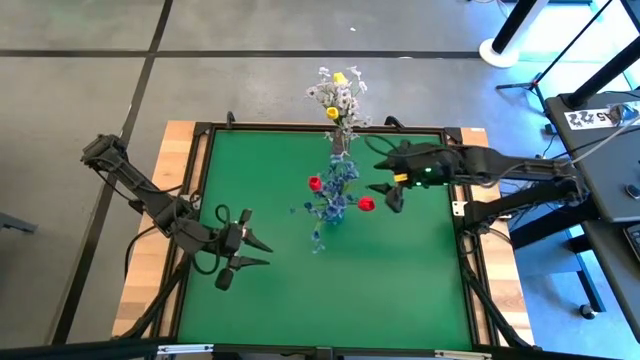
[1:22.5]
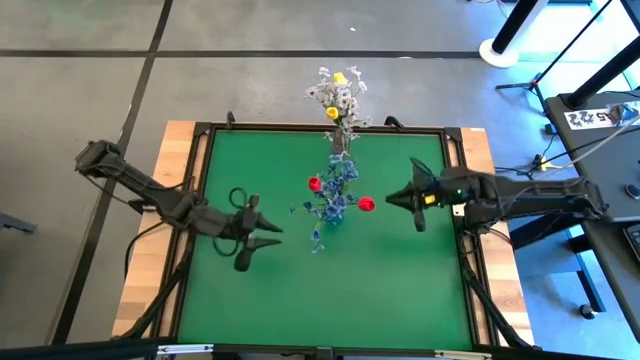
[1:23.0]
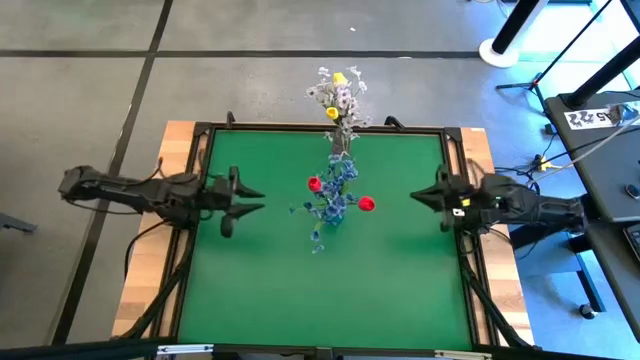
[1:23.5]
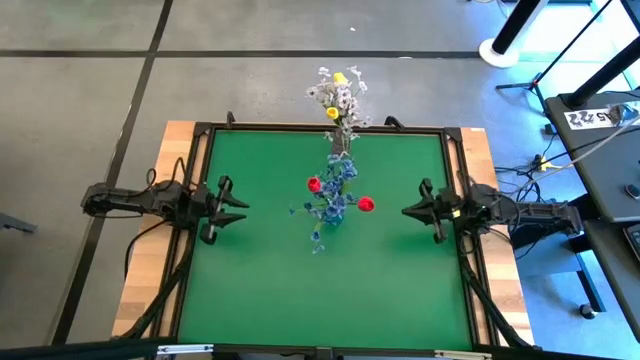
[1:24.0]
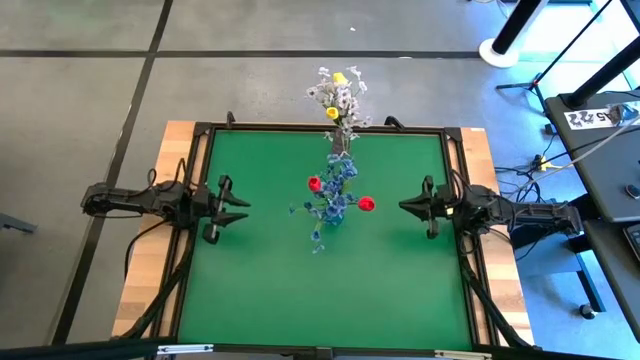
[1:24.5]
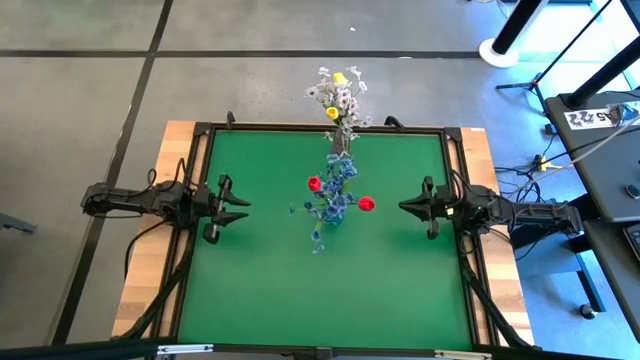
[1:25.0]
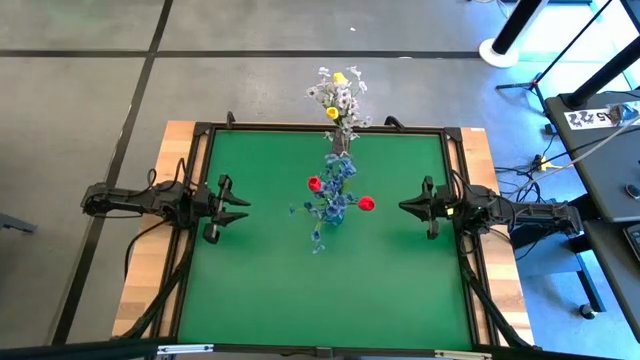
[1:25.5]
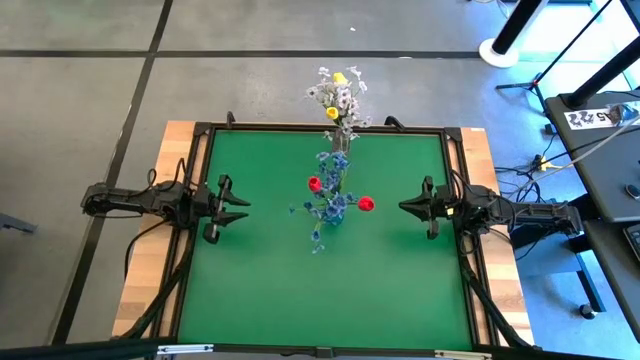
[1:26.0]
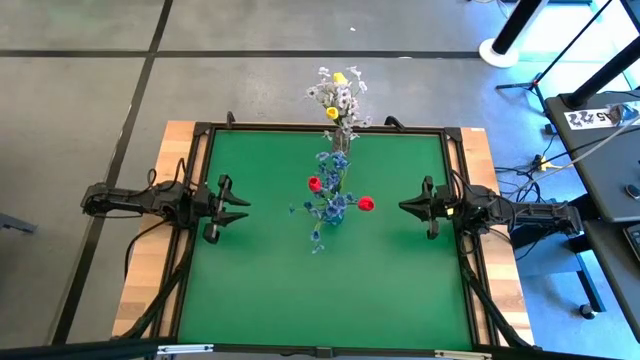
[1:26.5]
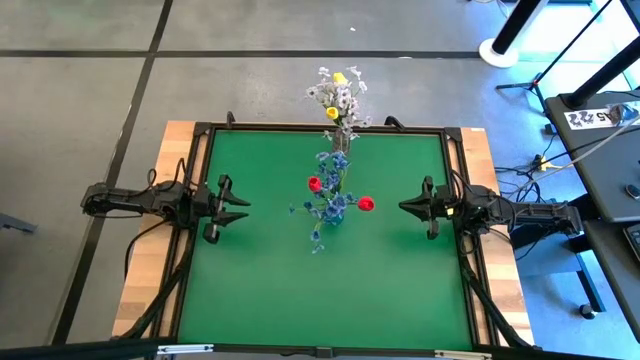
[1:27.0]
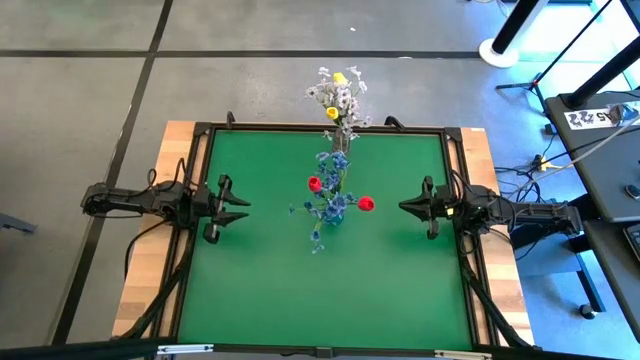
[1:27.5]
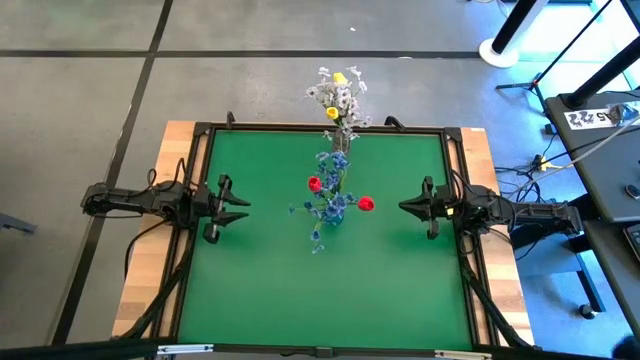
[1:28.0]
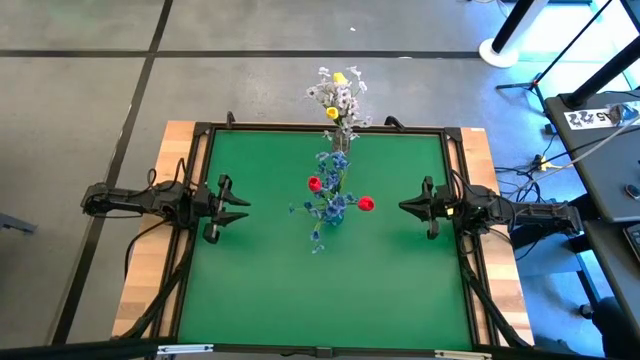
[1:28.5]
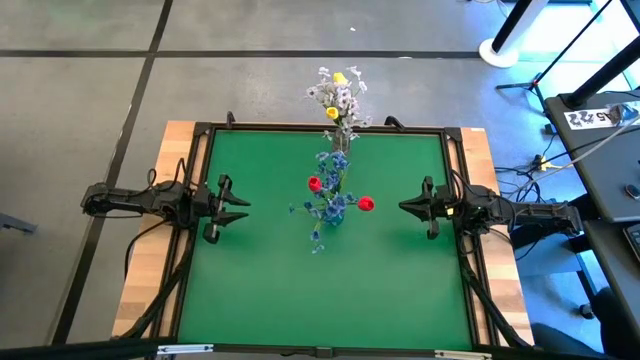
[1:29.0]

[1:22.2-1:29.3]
Task: Sort flowers into vase by color
Return to Home Position

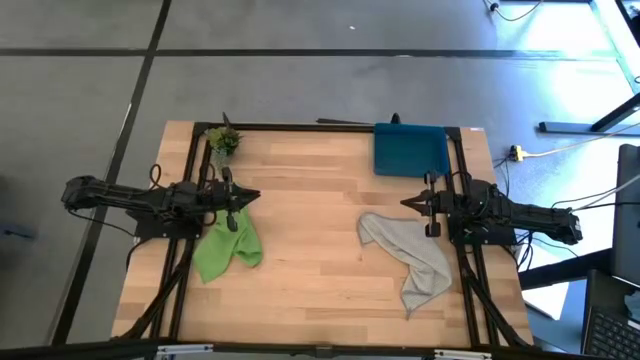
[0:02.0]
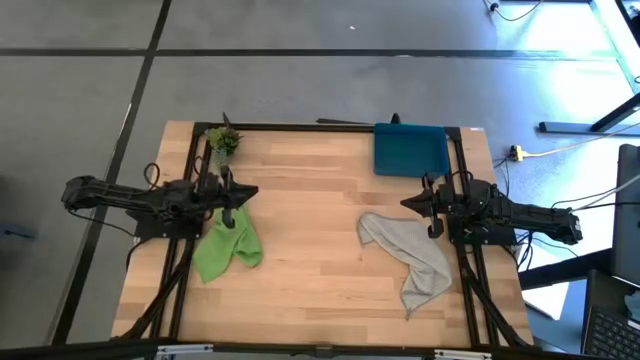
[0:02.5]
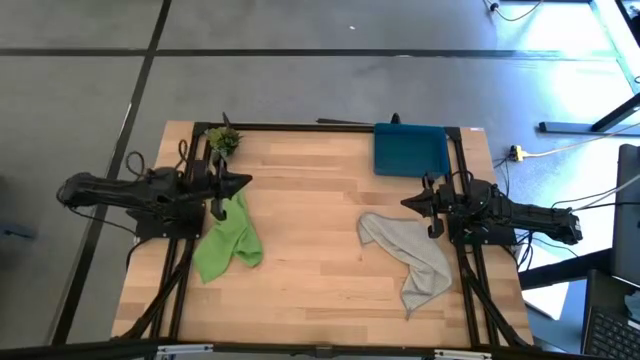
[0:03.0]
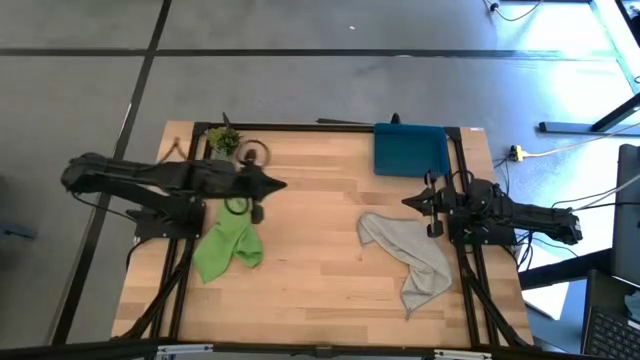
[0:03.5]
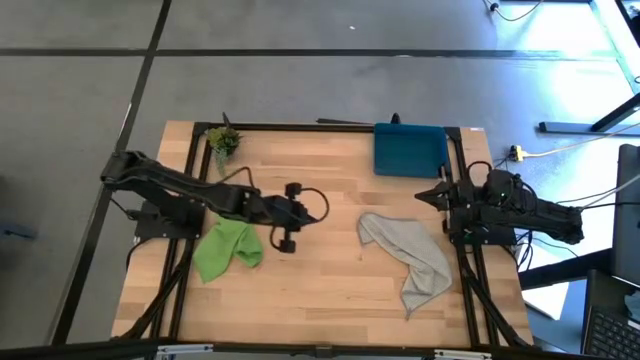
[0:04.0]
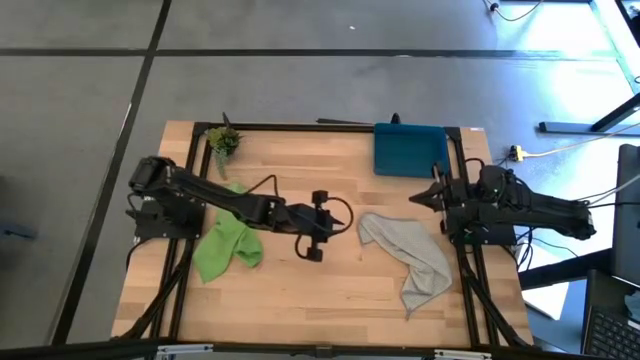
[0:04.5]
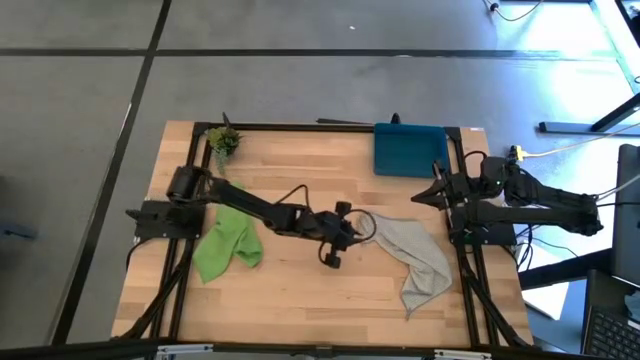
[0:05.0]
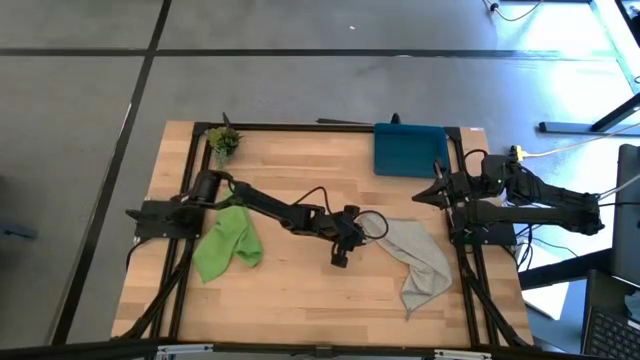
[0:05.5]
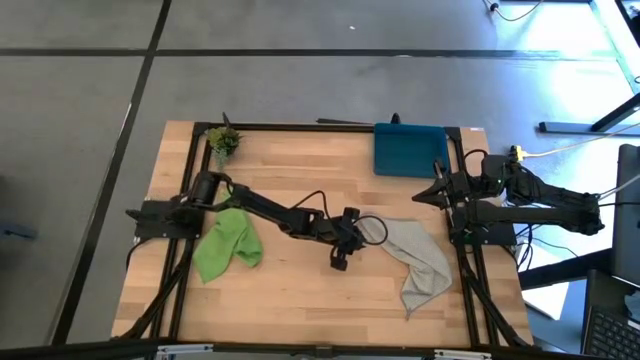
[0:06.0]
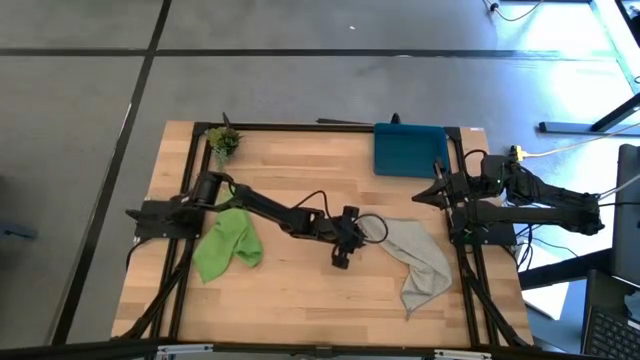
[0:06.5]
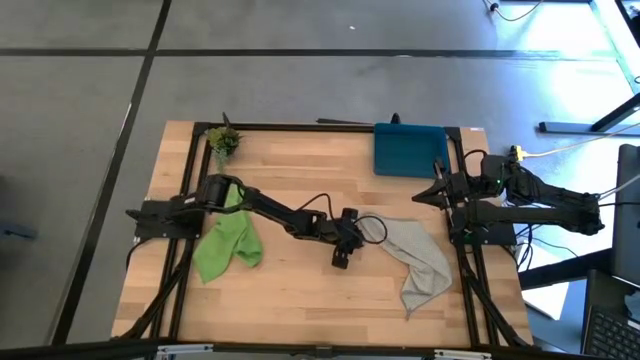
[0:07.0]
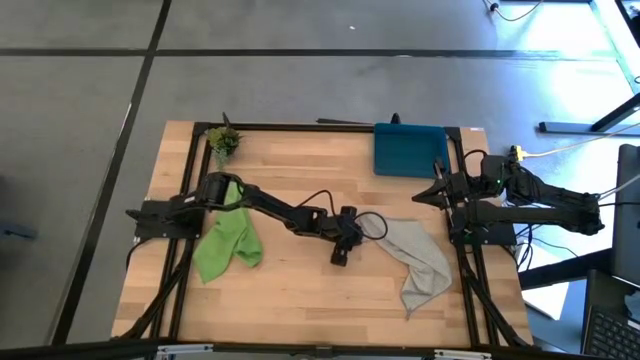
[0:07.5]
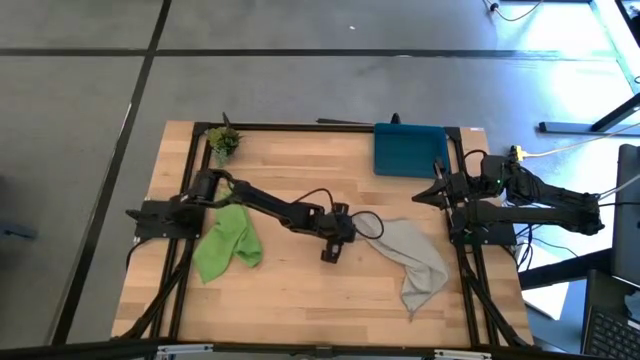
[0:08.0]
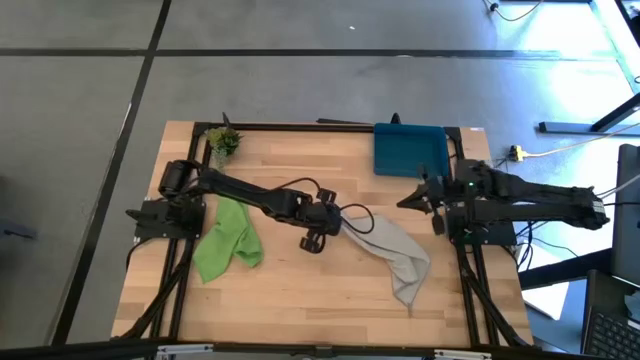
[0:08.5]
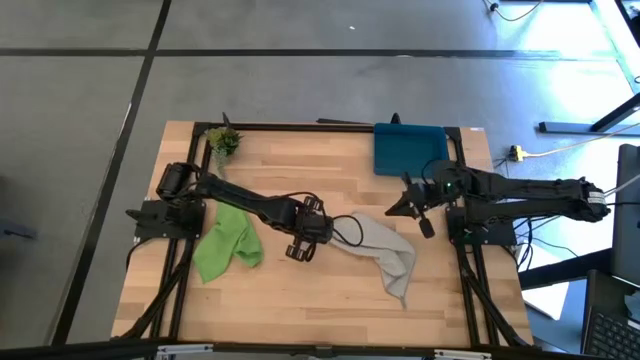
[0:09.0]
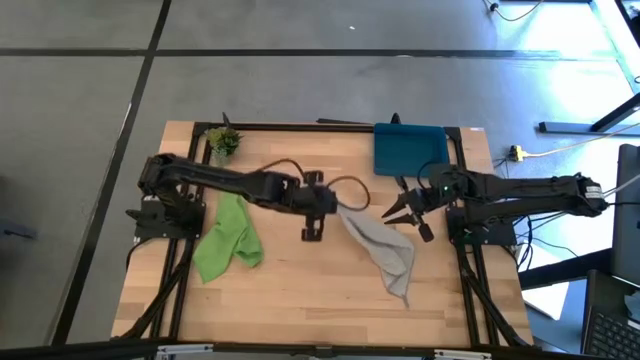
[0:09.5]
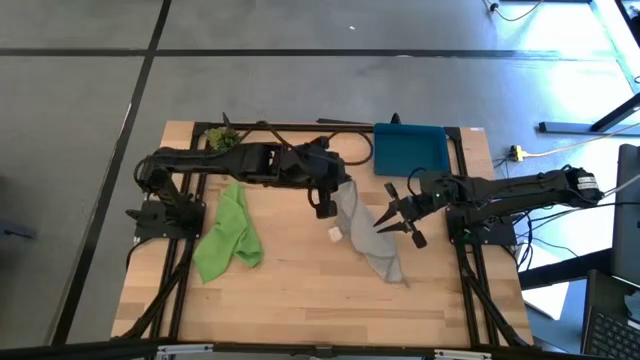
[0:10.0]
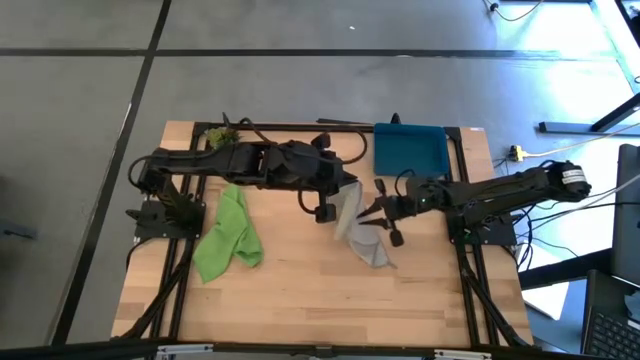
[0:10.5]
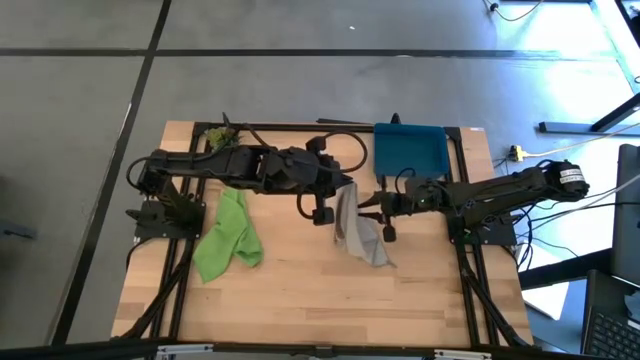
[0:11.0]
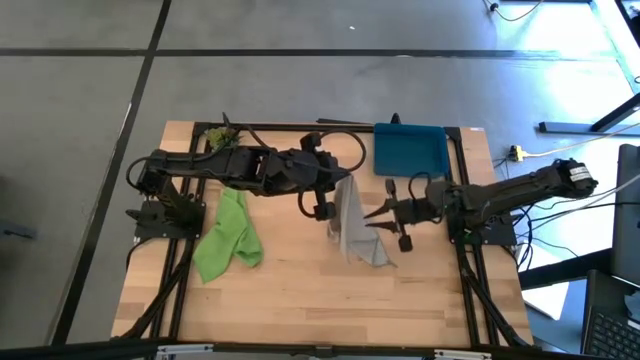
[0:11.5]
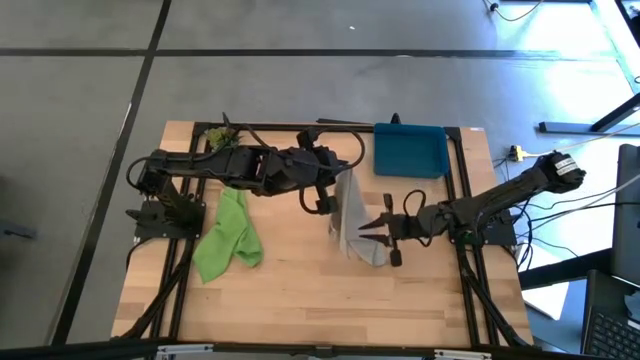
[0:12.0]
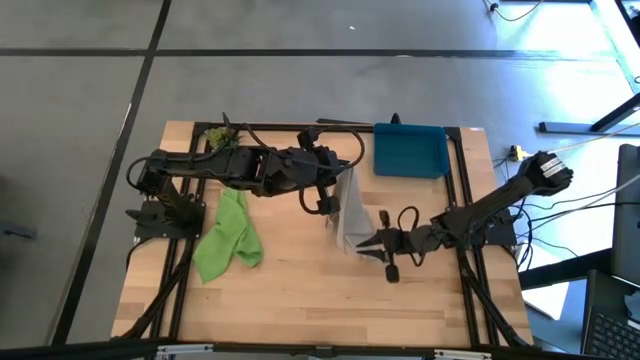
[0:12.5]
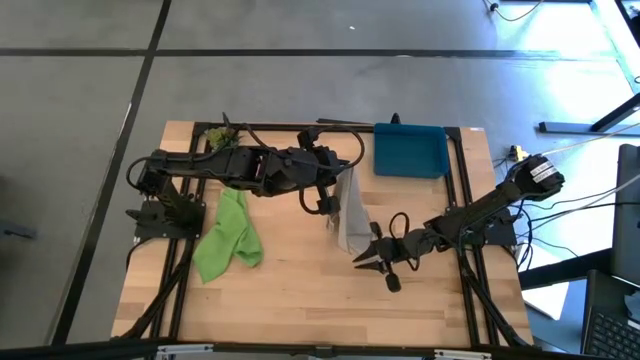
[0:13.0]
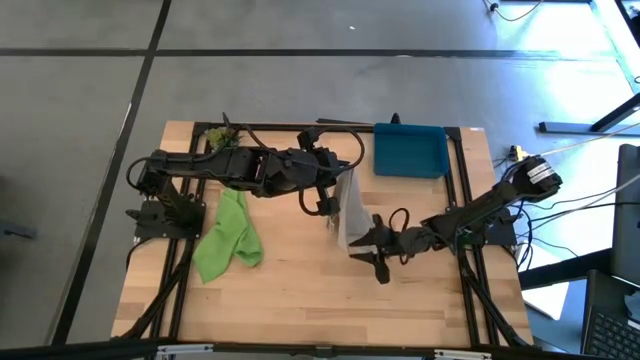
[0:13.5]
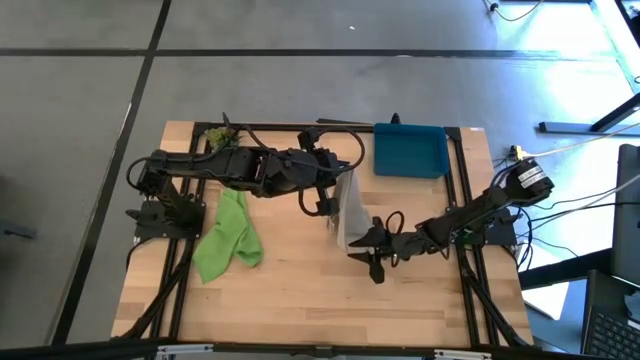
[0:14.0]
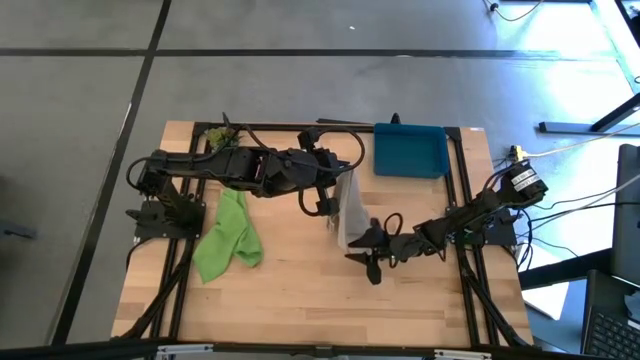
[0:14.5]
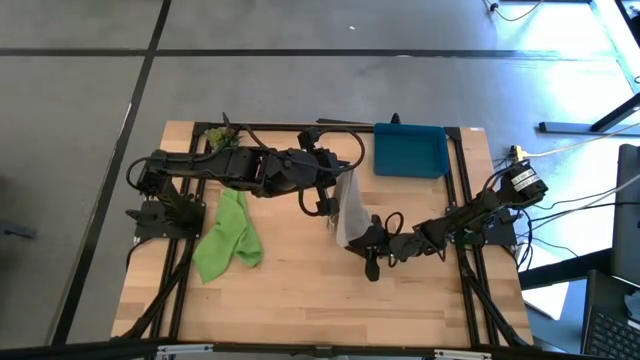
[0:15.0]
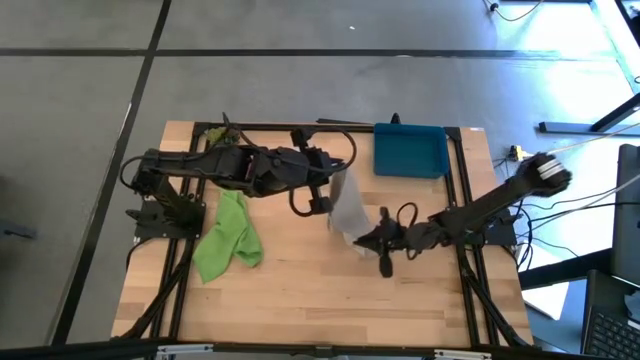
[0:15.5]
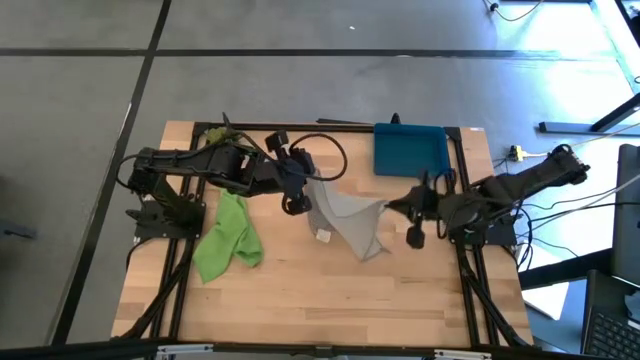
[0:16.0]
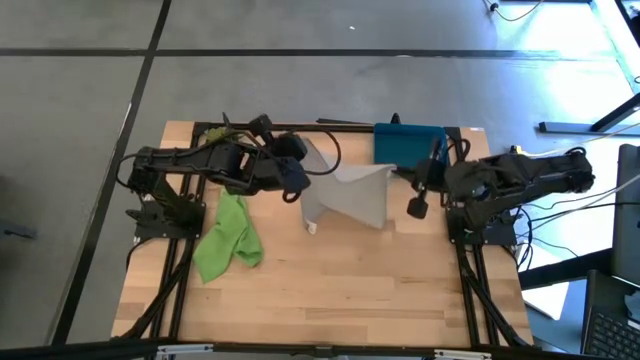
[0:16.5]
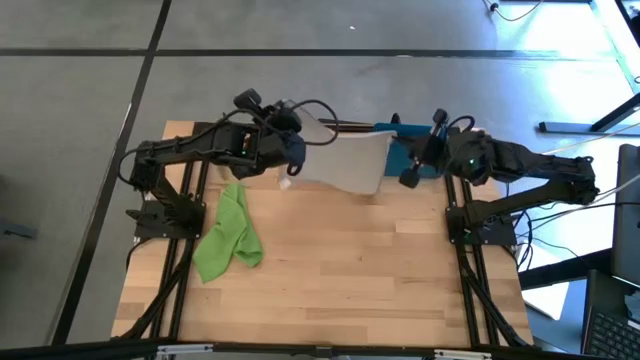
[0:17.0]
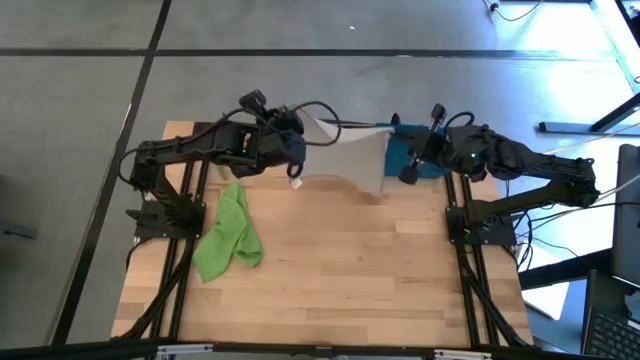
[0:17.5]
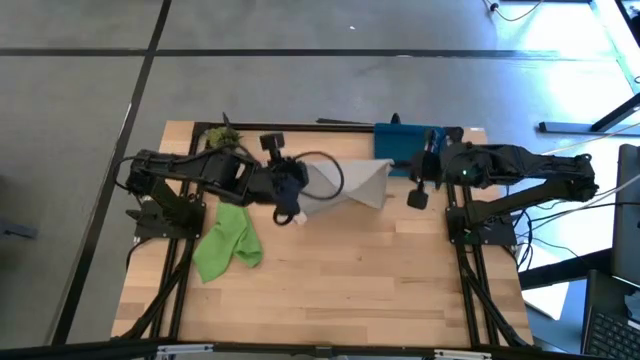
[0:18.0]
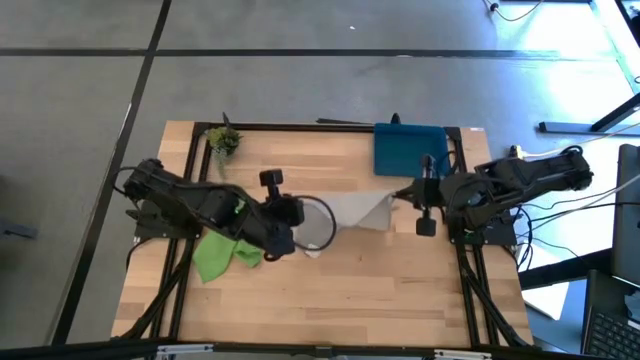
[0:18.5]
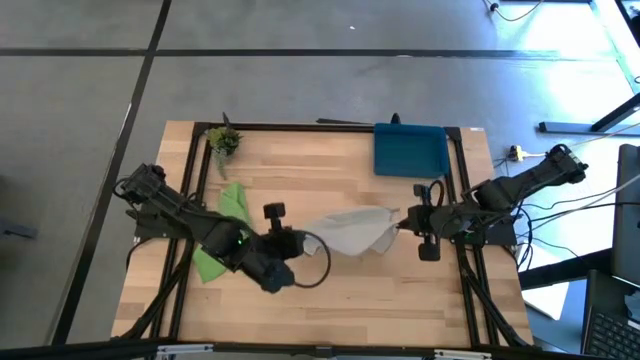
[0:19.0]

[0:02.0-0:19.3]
Task: Roll microfiber towels into tight, uniform cylinder then place into a basket
Fold the gray microfiber cloth
